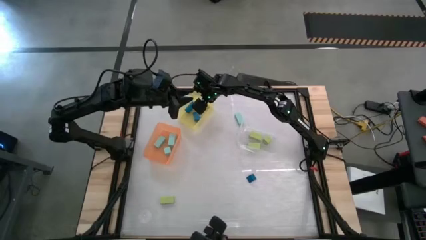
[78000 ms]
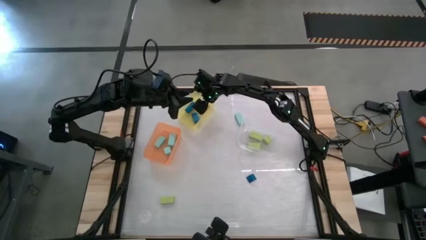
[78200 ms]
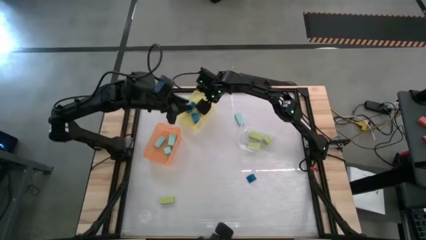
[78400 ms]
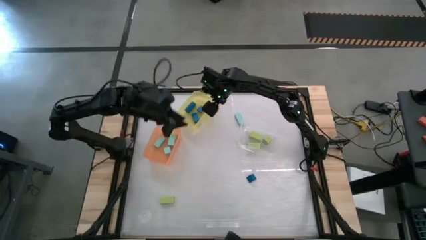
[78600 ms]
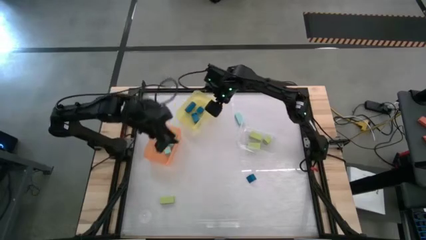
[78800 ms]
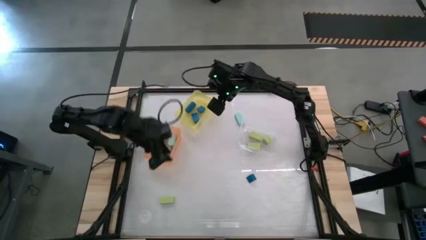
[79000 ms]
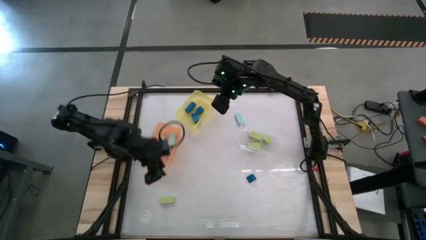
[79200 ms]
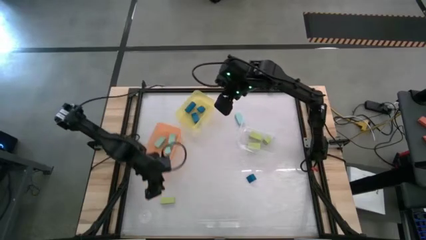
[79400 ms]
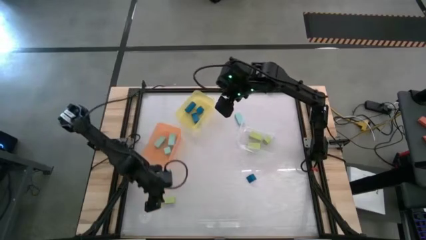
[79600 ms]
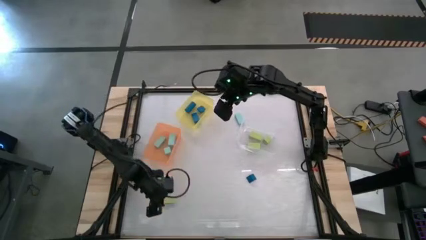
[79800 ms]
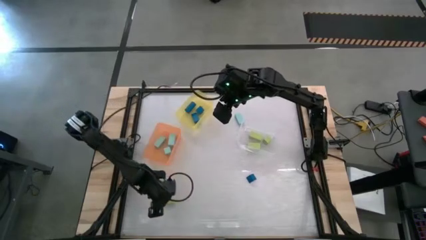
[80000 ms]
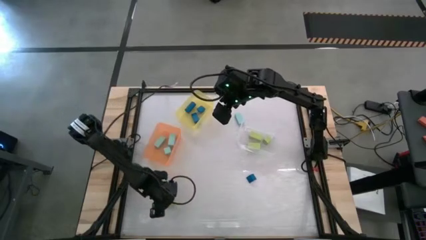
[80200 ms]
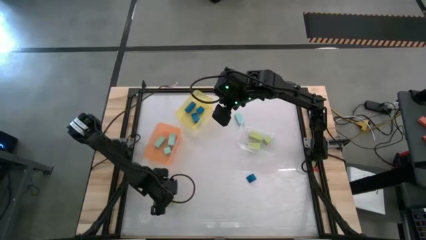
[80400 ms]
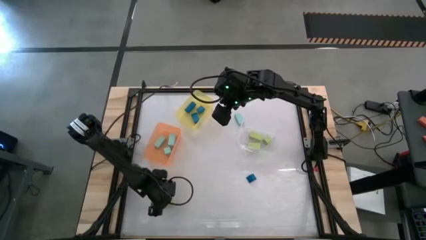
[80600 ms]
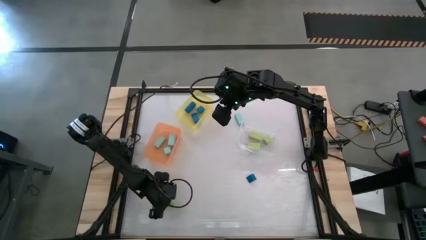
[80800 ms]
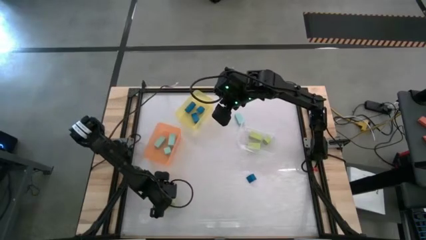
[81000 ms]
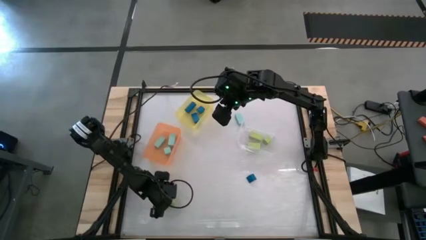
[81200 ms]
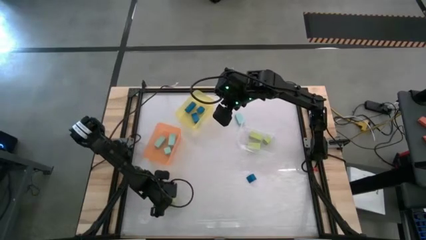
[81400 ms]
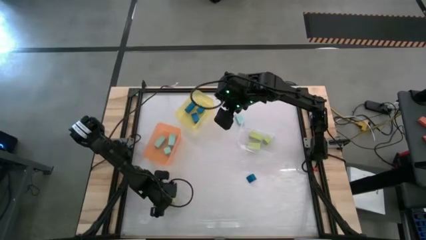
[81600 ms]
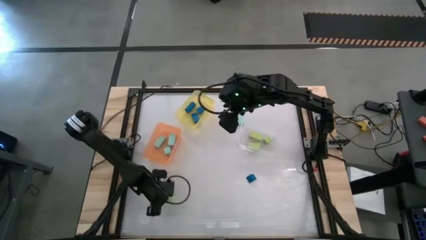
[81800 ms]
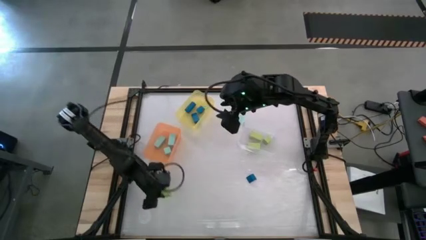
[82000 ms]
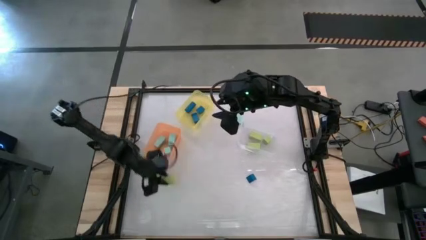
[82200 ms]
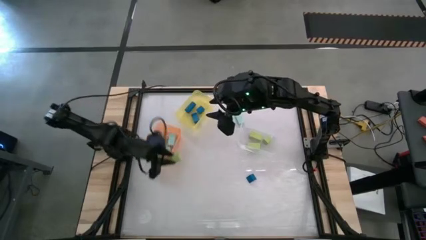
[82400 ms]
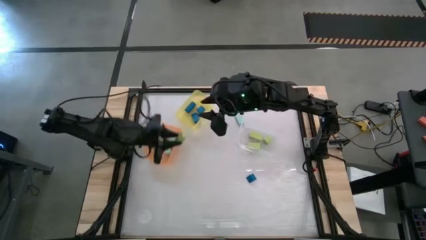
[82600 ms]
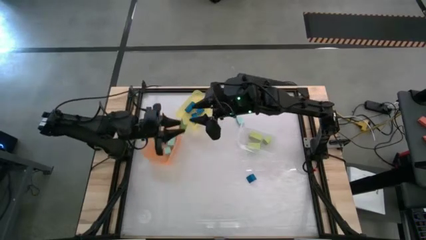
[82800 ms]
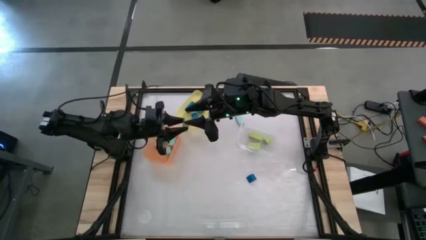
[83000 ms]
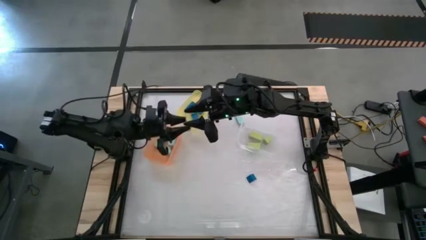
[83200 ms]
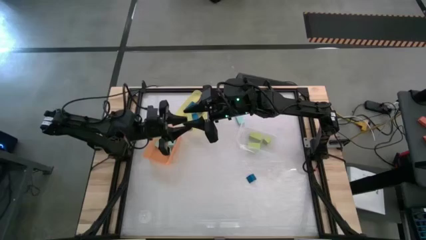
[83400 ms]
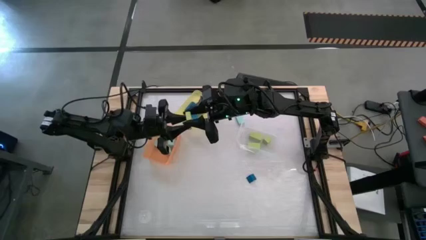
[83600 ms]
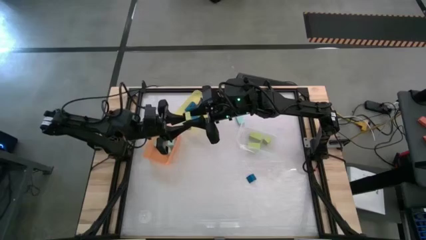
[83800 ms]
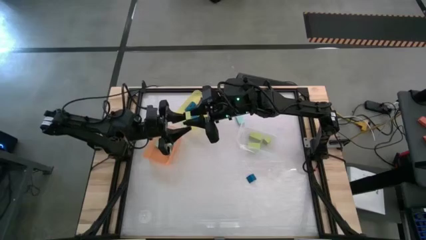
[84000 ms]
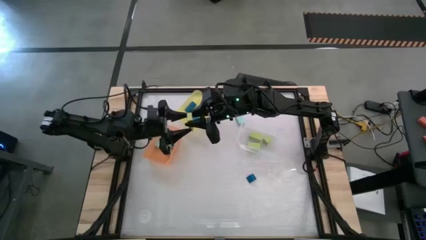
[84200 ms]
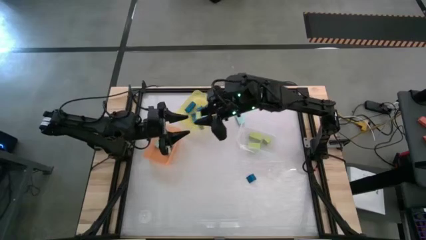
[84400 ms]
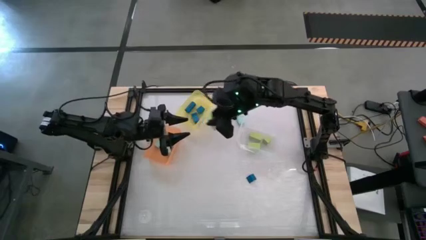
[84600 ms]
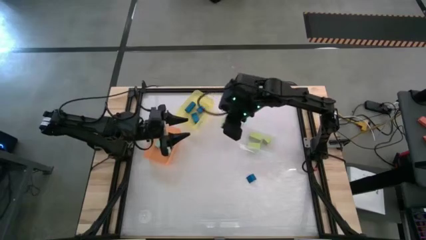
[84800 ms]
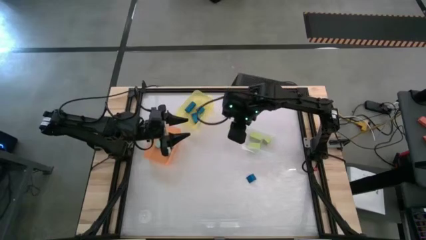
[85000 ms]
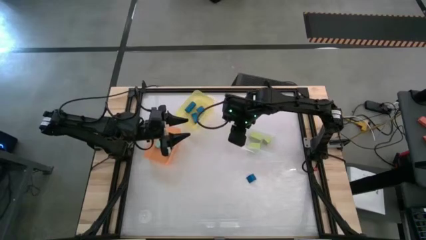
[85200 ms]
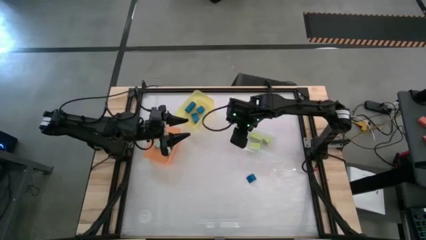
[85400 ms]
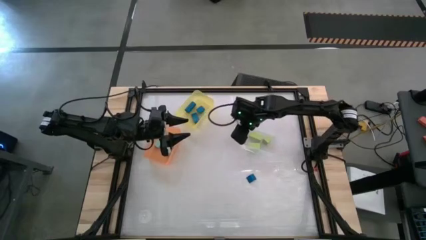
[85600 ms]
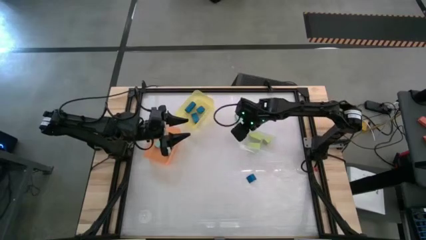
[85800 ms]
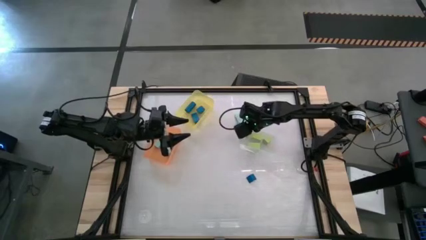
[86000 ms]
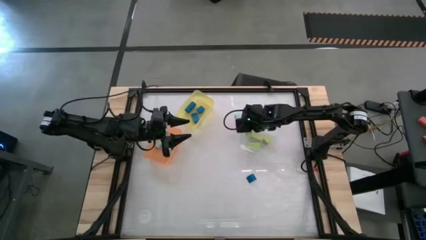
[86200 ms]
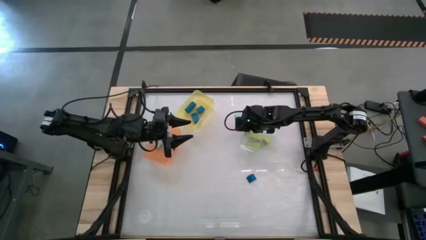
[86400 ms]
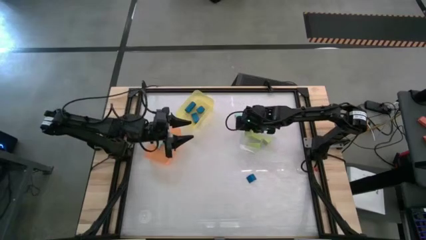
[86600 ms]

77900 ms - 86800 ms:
Task: Sort & place blocks by color
Put the green block into the transparent bin

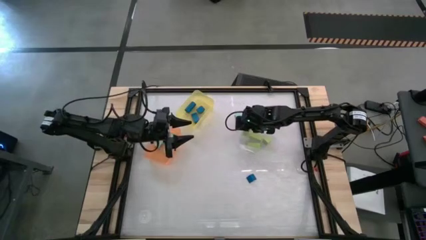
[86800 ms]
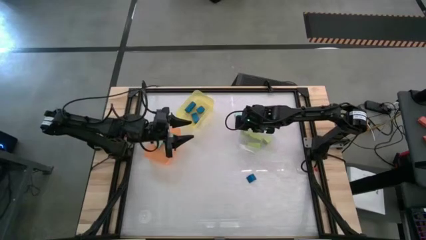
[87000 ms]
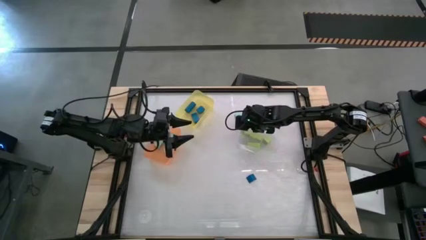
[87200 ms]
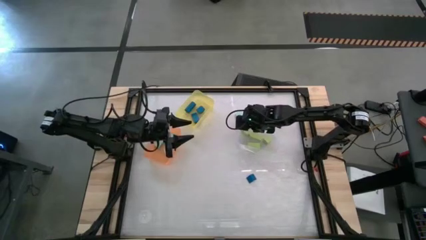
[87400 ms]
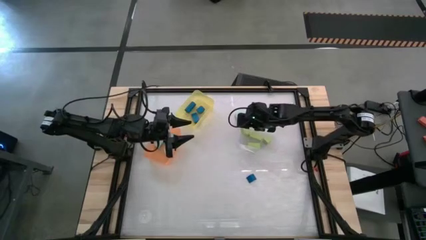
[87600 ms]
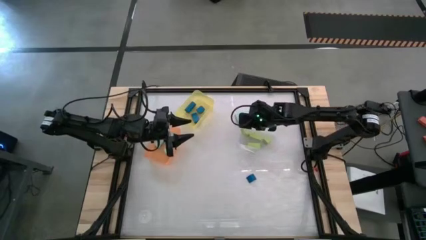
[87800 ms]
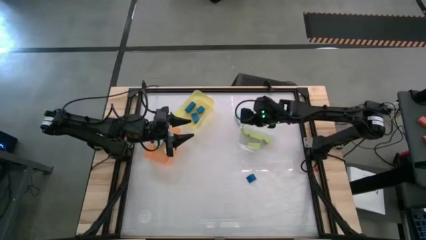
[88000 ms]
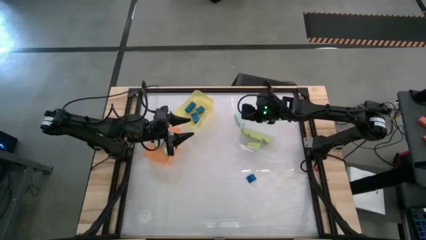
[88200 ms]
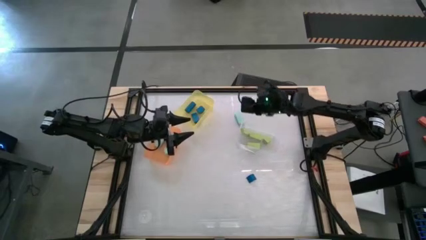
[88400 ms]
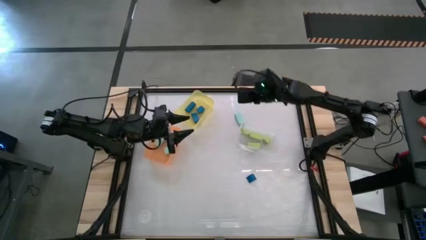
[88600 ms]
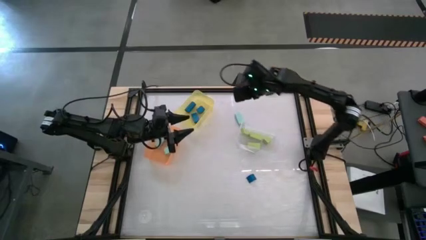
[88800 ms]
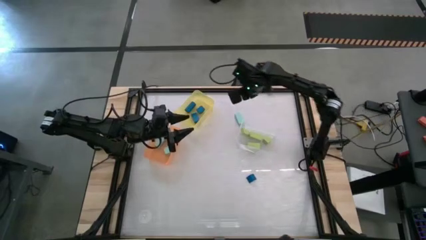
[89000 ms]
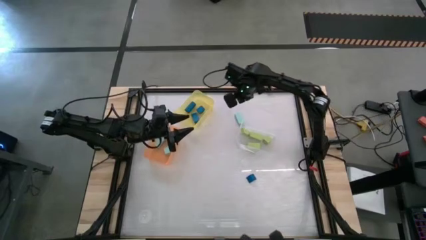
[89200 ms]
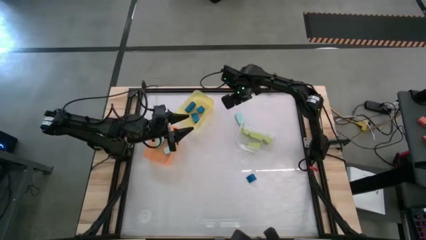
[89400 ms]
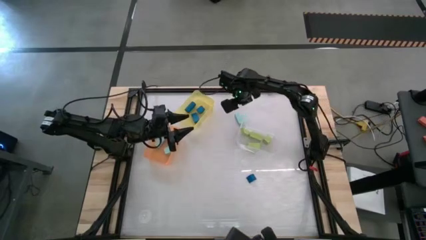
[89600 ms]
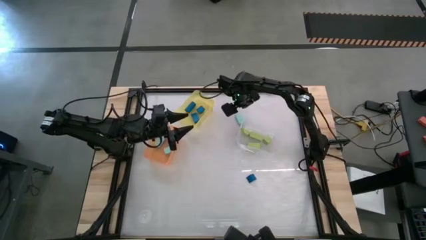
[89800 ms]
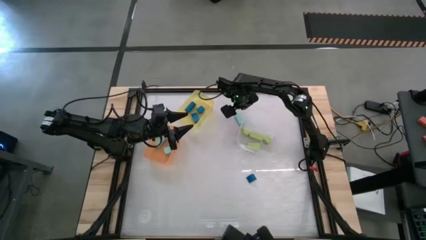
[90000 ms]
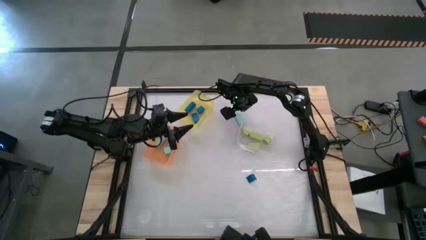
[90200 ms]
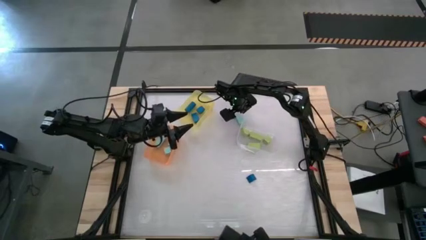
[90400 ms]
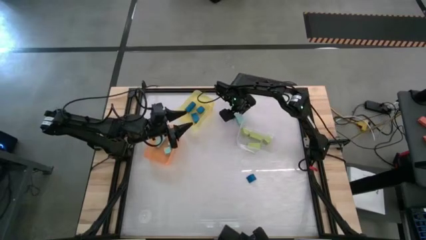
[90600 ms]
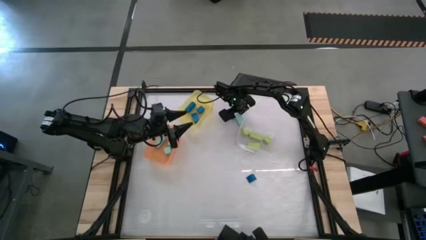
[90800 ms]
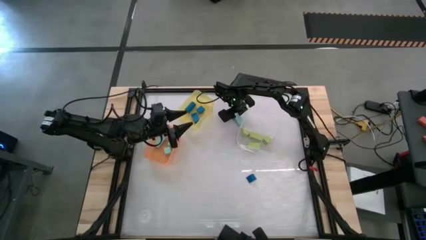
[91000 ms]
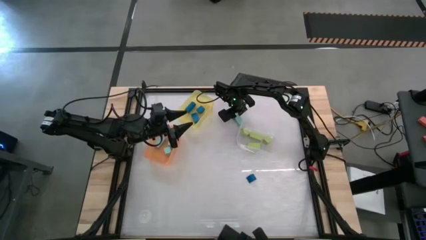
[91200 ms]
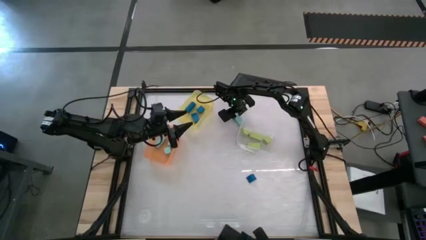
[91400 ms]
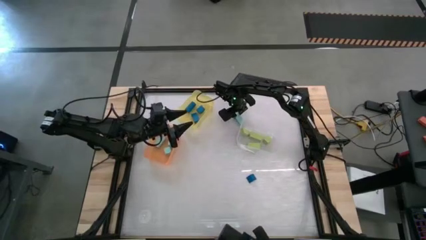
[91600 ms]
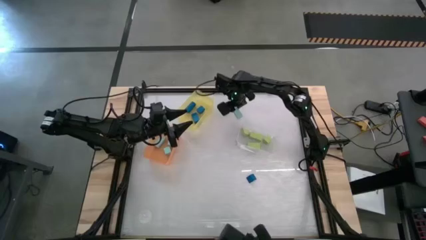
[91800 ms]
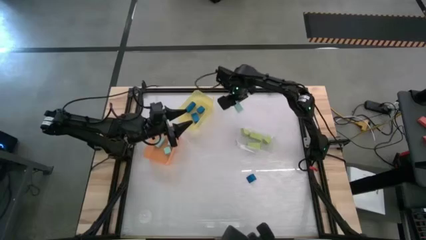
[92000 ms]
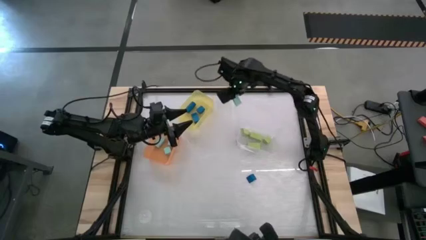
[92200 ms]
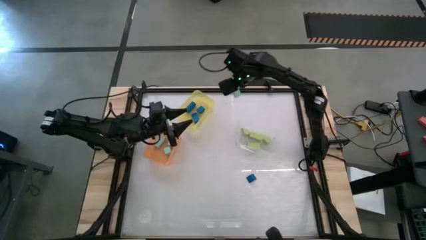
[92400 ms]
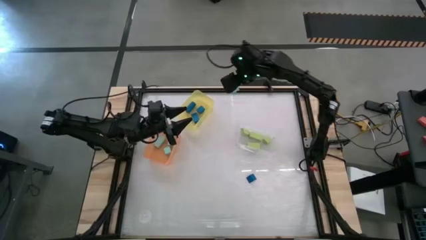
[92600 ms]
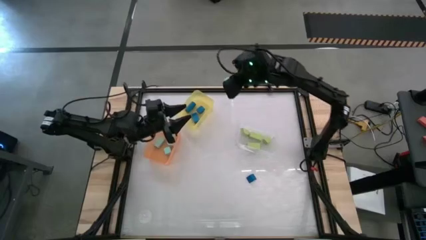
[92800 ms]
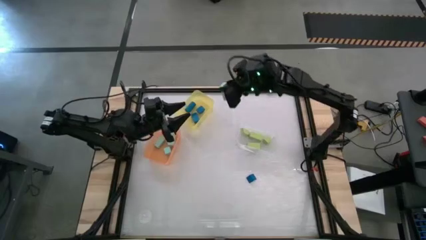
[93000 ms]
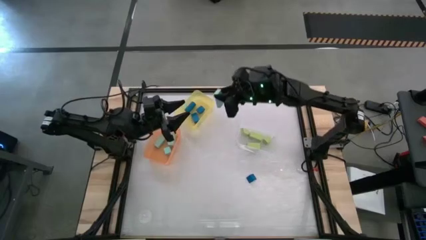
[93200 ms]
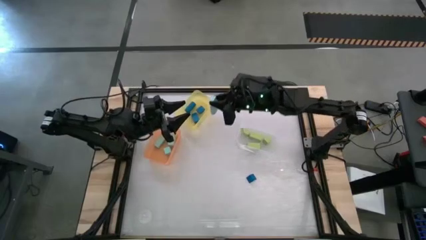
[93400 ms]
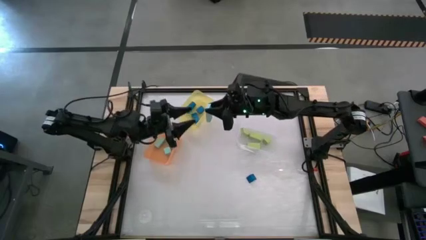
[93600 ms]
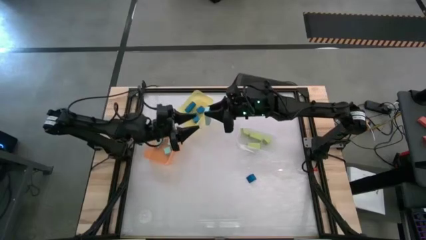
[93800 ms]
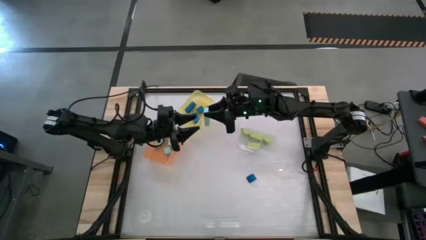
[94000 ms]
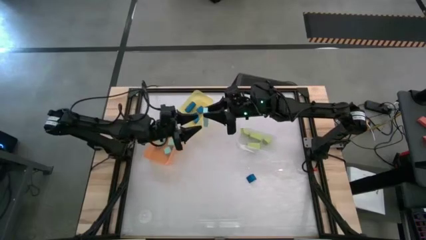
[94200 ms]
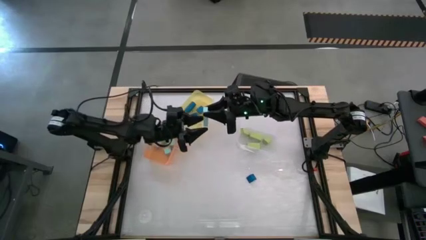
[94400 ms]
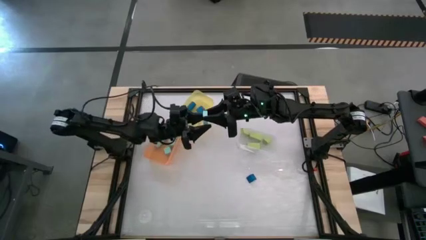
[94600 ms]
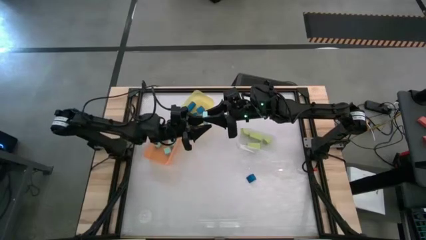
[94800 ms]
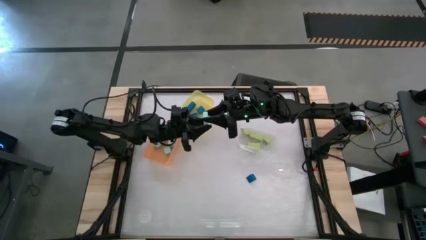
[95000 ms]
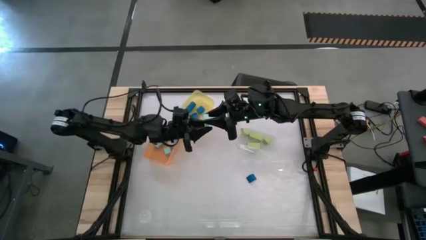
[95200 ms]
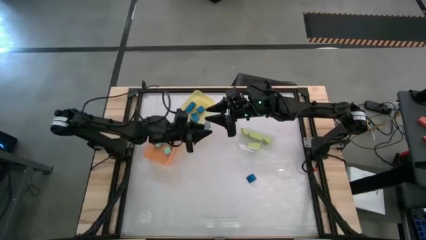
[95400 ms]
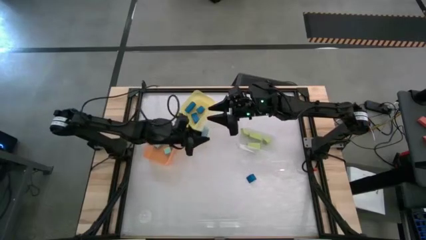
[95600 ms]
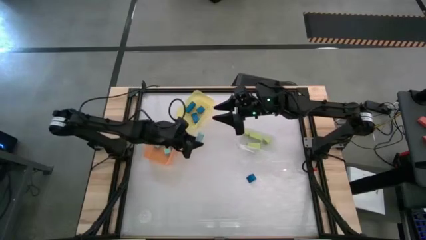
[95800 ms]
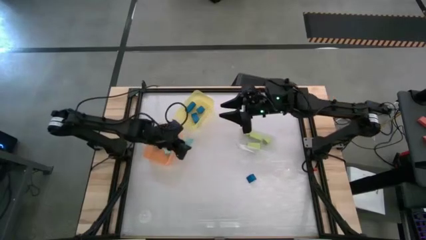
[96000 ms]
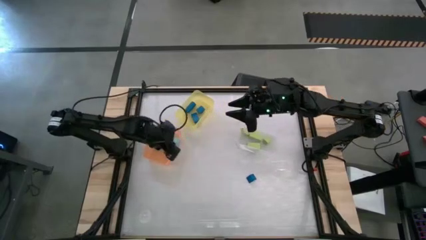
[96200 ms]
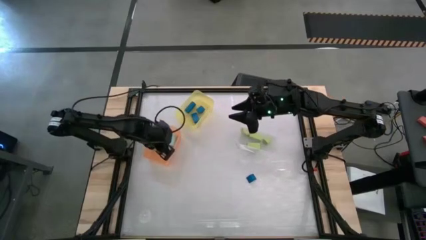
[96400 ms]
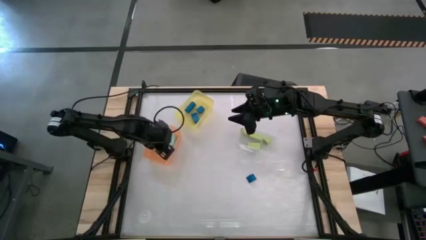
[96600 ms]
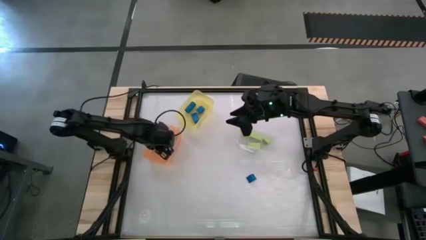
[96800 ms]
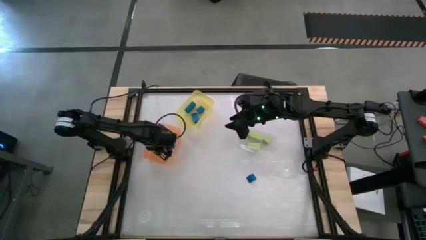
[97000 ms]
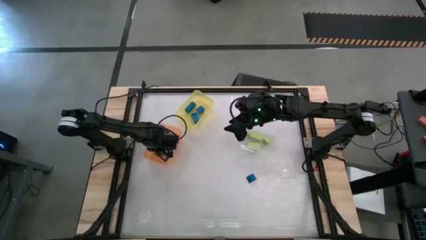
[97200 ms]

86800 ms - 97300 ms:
Put the light blue block into the orange bin
